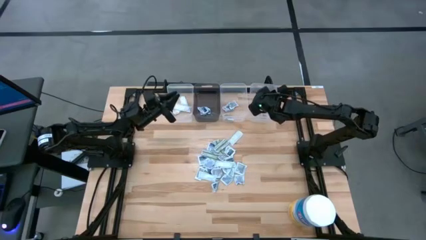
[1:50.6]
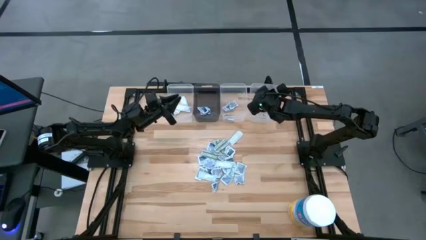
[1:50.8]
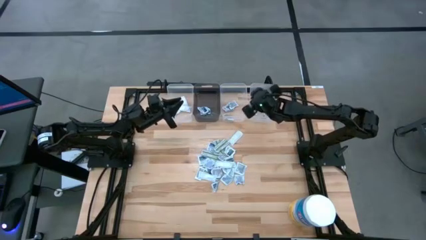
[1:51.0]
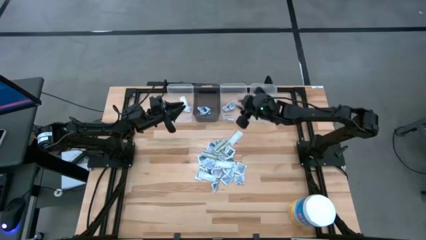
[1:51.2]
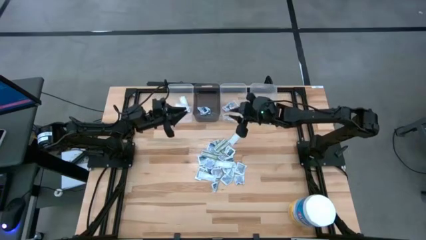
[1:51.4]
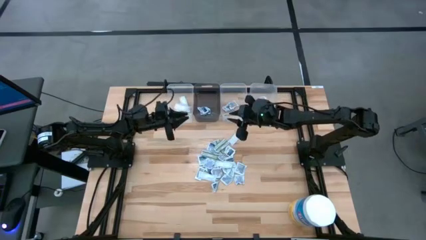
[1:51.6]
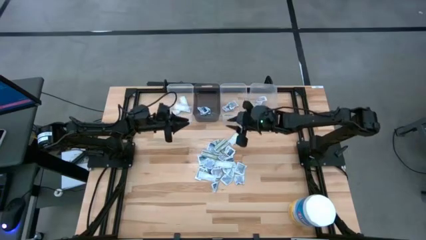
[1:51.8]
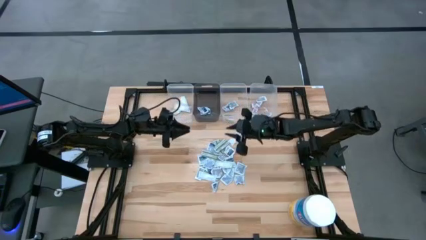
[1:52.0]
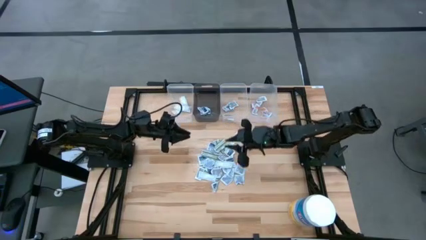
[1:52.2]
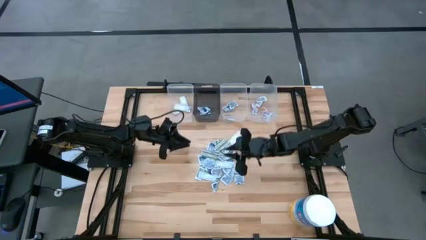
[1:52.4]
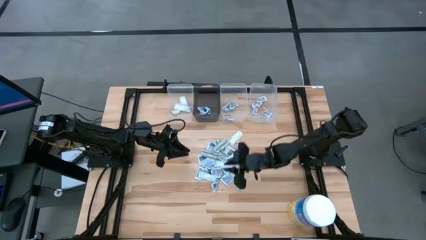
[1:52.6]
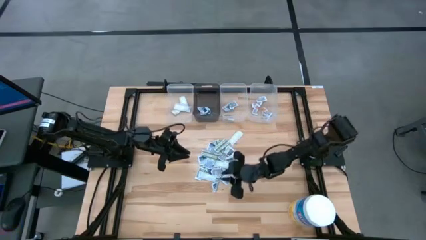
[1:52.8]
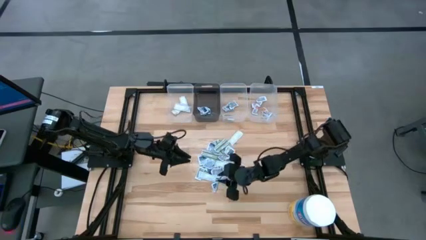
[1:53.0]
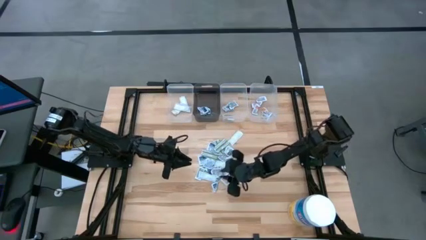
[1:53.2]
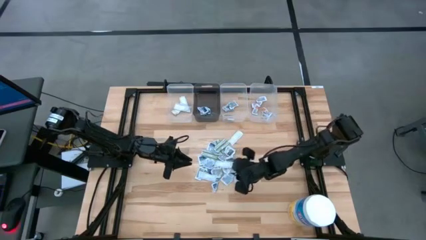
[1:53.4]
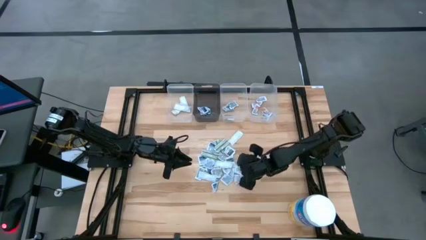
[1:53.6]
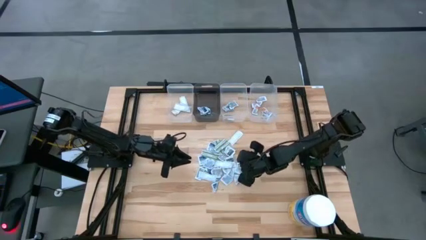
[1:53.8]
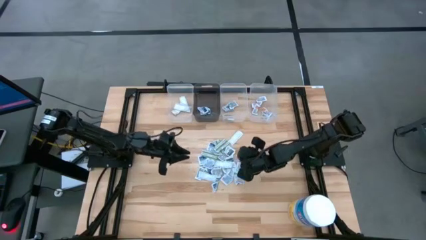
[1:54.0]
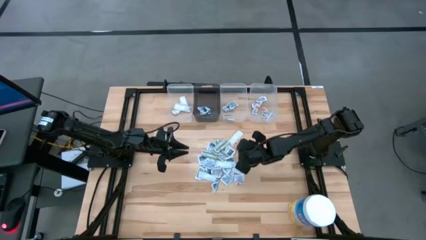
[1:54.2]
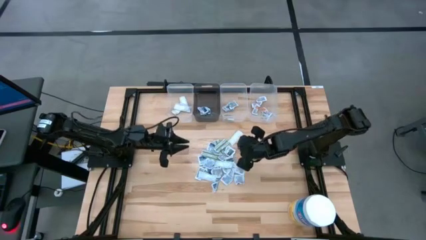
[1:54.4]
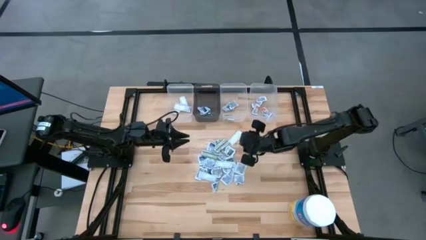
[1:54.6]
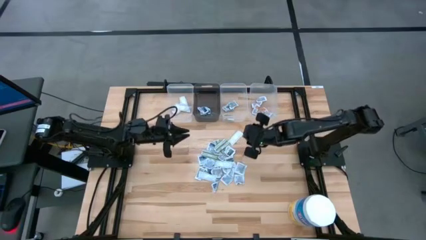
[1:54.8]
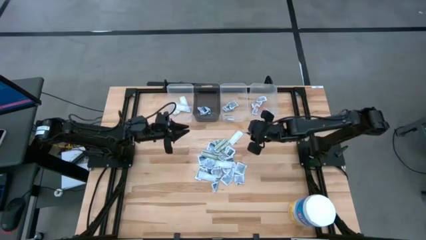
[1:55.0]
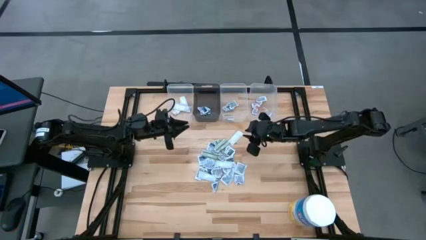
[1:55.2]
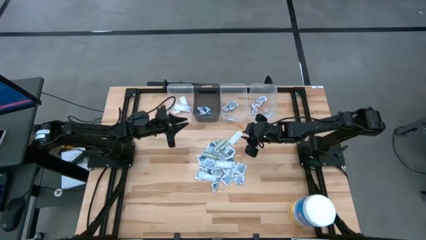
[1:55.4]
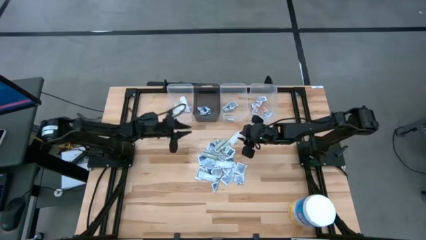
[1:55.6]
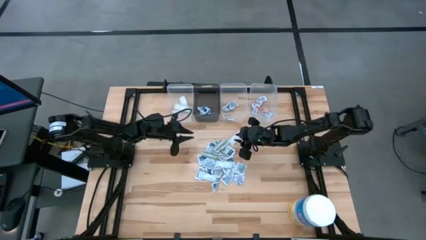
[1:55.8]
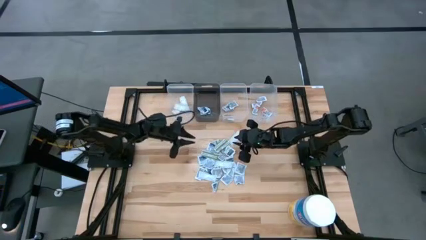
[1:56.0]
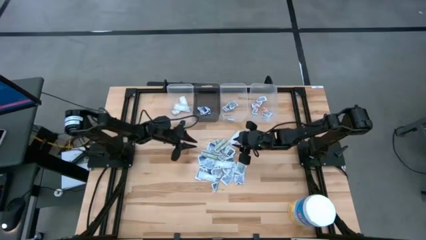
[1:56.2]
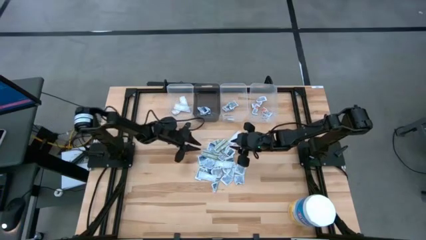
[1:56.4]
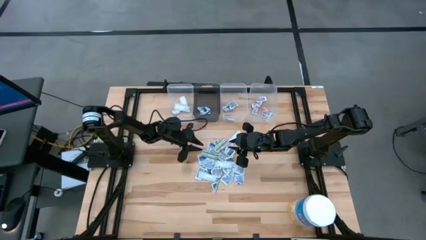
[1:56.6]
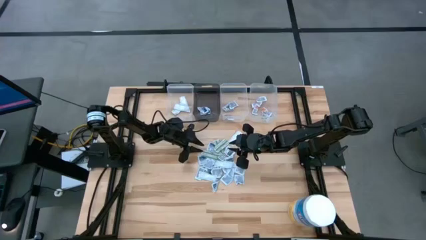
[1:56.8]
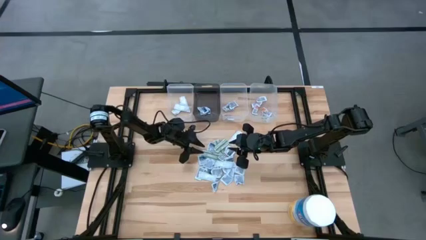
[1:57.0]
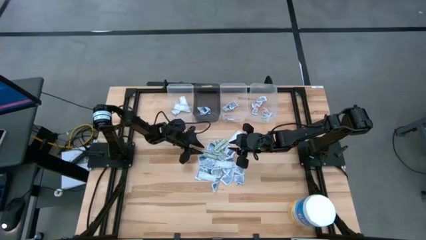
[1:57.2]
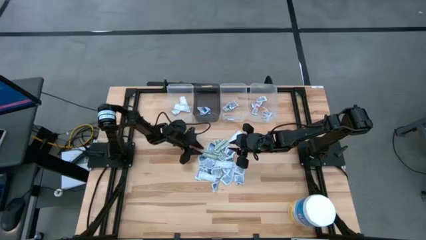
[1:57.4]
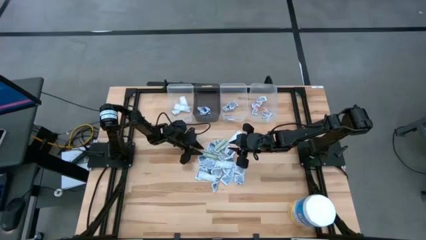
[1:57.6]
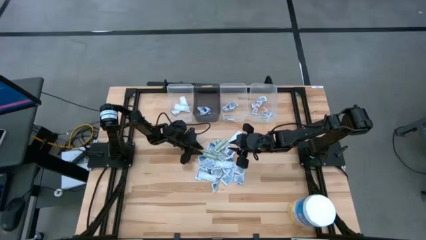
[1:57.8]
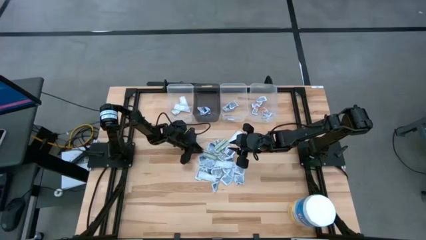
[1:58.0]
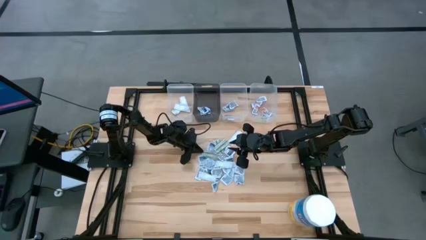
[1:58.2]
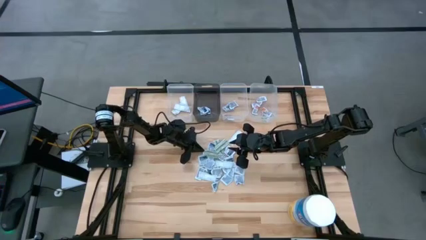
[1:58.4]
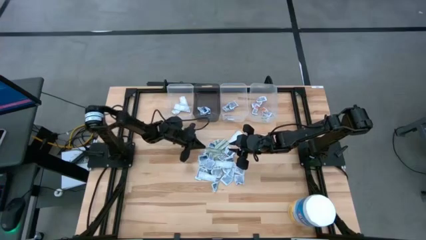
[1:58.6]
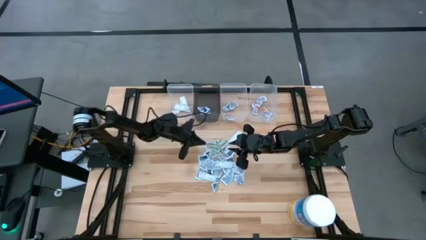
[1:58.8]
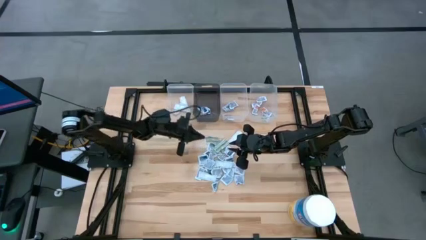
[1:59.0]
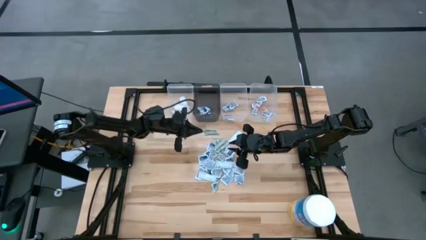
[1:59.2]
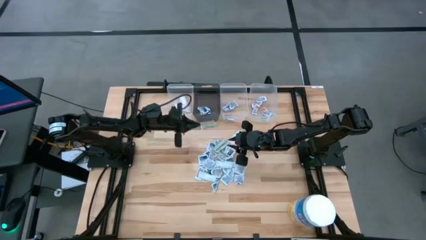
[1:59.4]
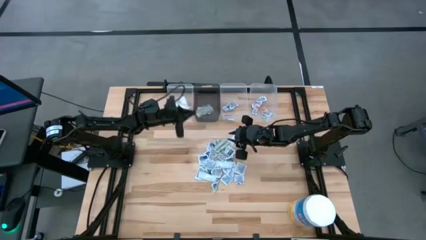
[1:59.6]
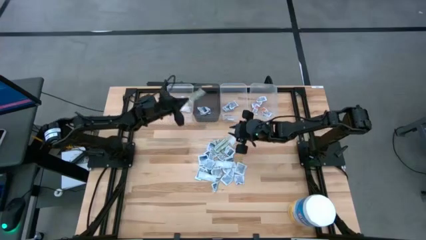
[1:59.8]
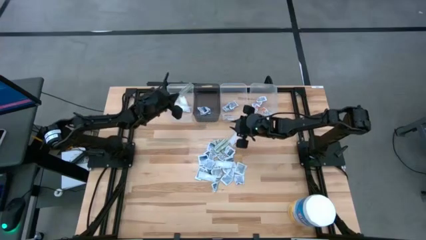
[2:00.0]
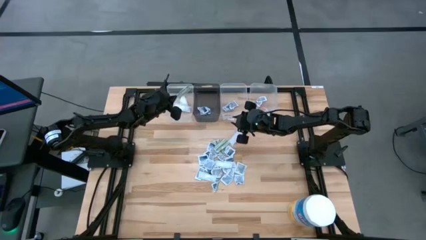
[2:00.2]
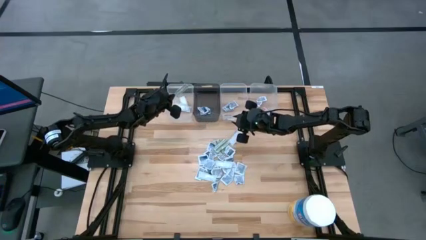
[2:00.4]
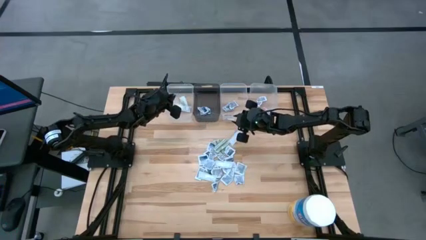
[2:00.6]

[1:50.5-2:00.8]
Task: Pick & Place First Aid Supplies
Put the bandage into the left transparent bin

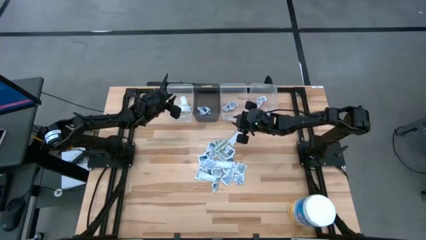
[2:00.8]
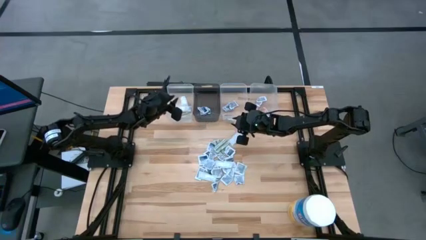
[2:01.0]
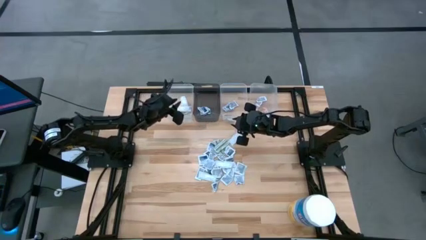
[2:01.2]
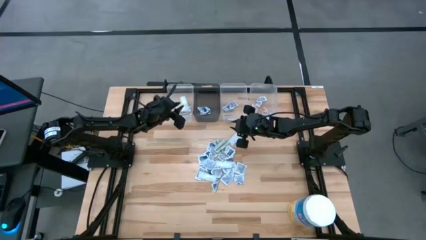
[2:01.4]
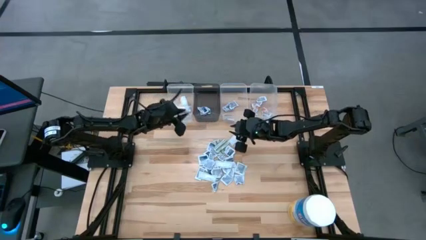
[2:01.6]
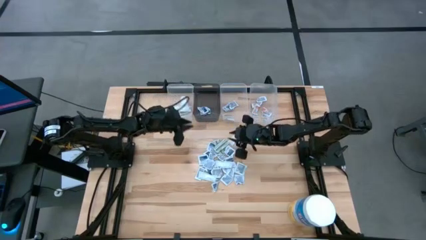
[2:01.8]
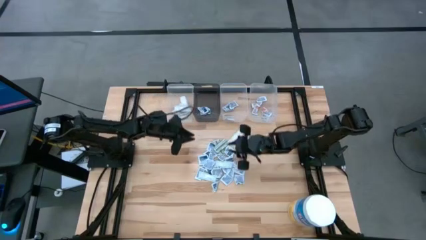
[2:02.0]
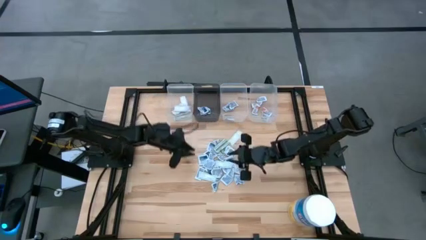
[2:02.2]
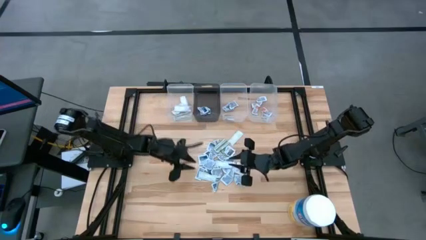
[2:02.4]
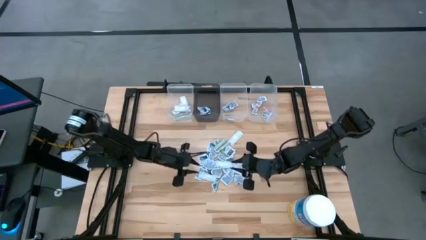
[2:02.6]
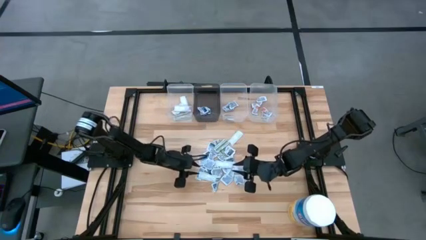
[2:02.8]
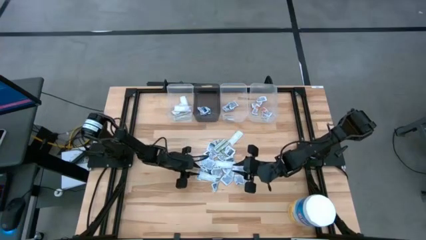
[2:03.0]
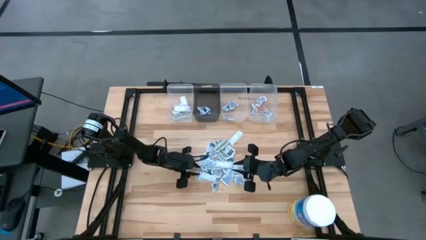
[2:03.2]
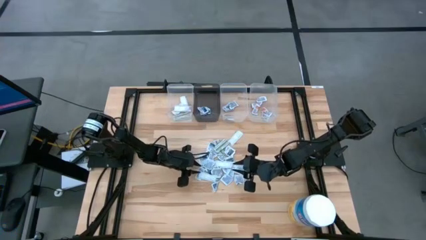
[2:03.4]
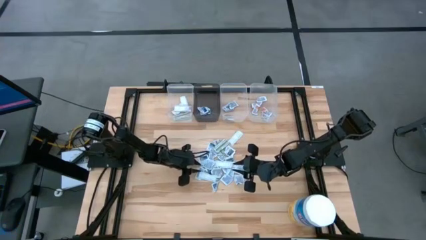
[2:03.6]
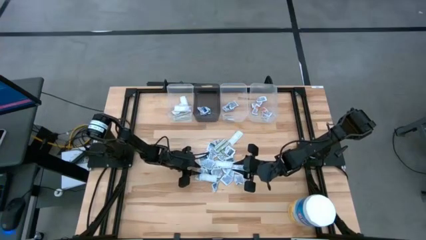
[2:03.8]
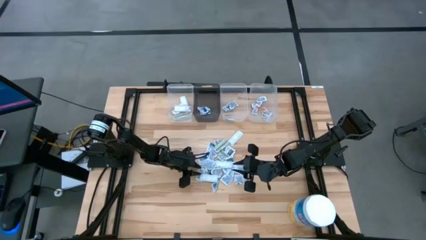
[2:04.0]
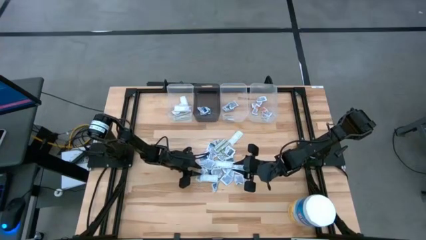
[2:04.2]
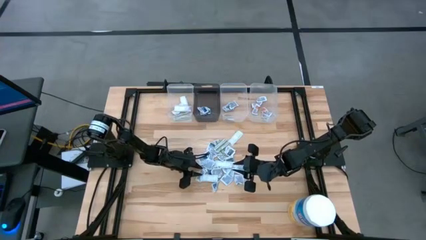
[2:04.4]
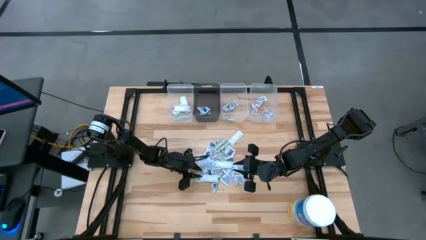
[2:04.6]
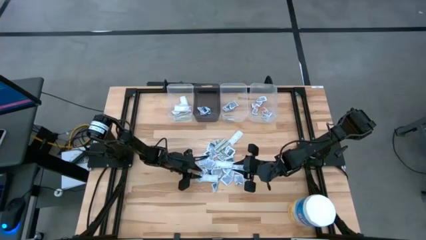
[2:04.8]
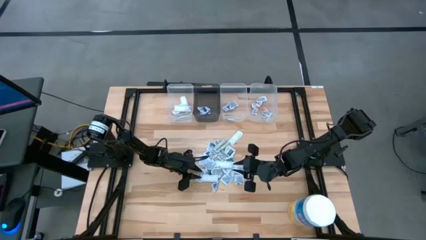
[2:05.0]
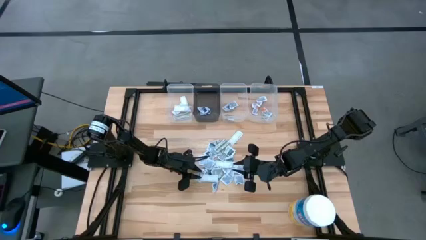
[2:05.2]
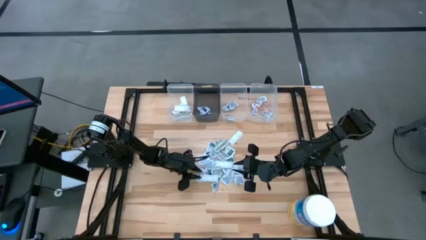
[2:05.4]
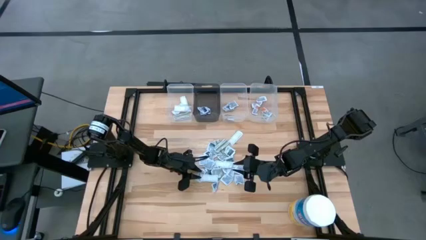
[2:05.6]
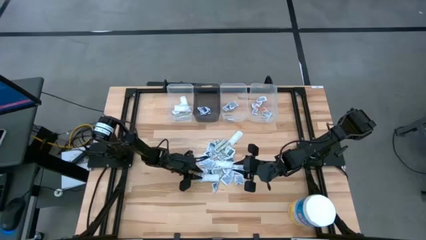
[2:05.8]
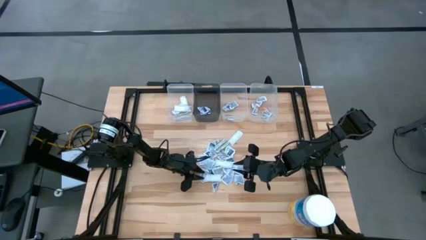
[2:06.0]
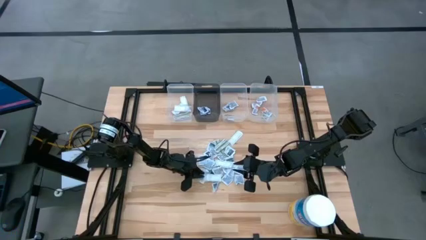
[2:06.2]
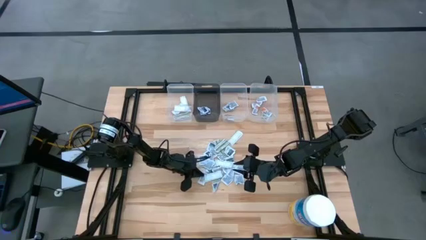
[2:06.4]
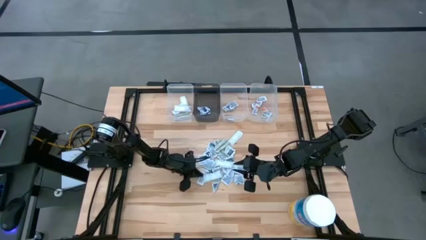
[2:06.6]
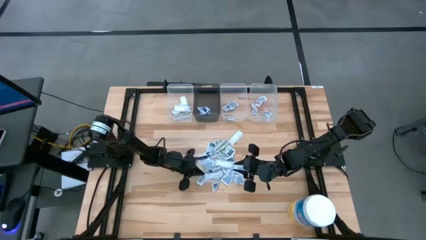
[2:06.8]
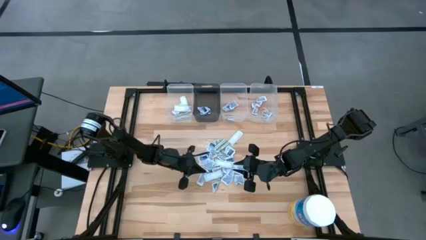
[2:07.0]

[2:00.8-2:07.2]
Put the bandage into the left transparent bin
